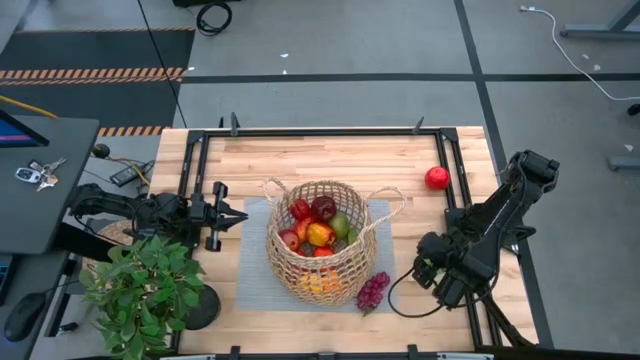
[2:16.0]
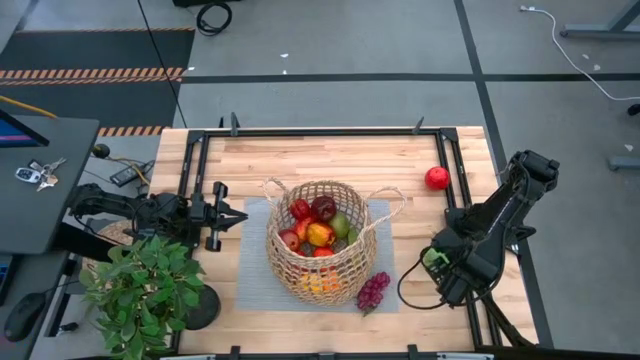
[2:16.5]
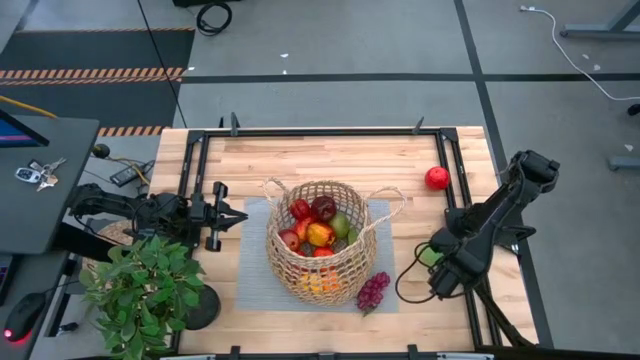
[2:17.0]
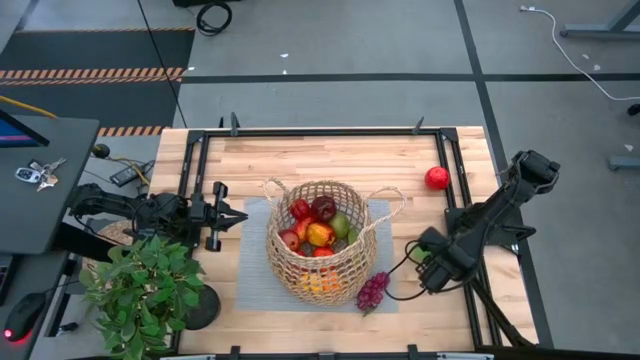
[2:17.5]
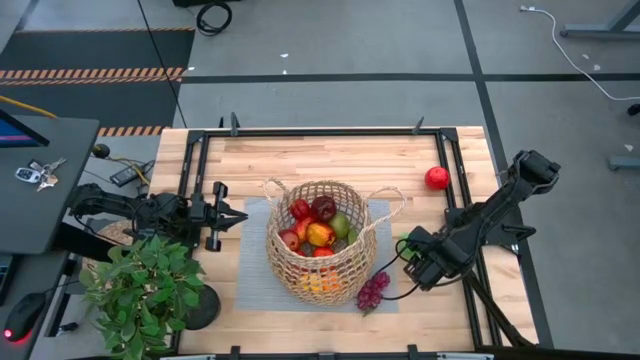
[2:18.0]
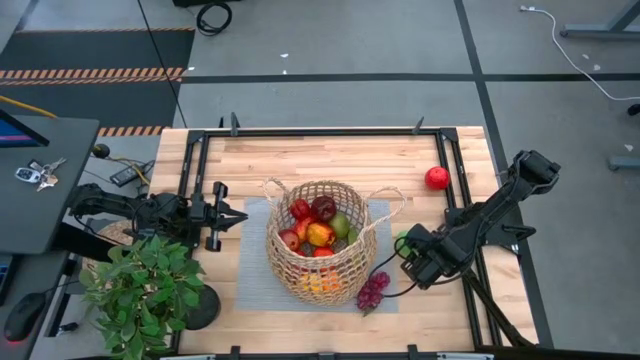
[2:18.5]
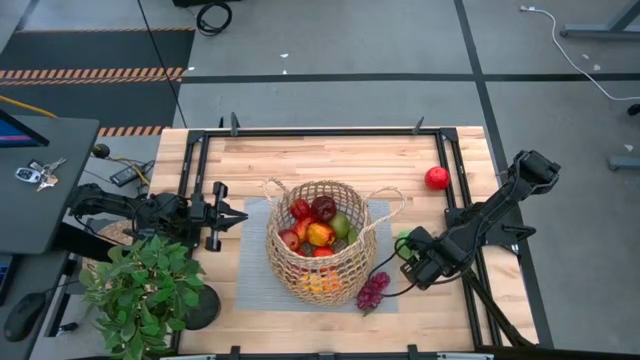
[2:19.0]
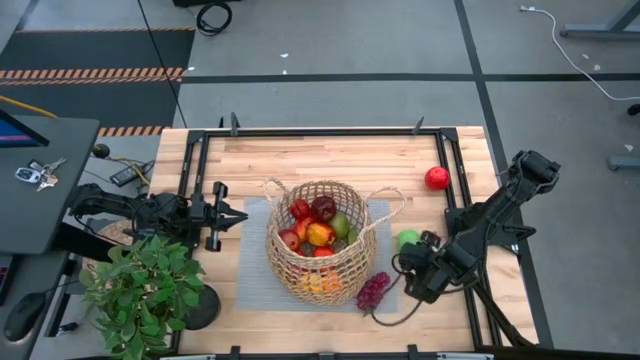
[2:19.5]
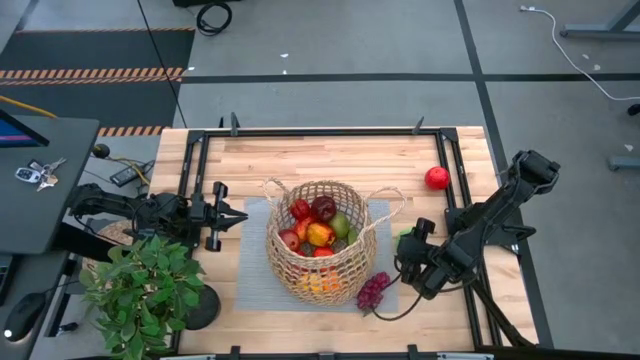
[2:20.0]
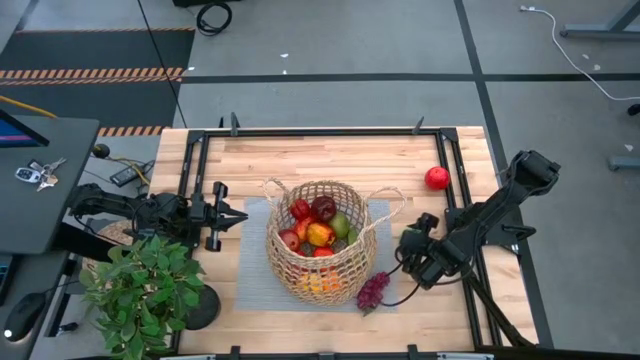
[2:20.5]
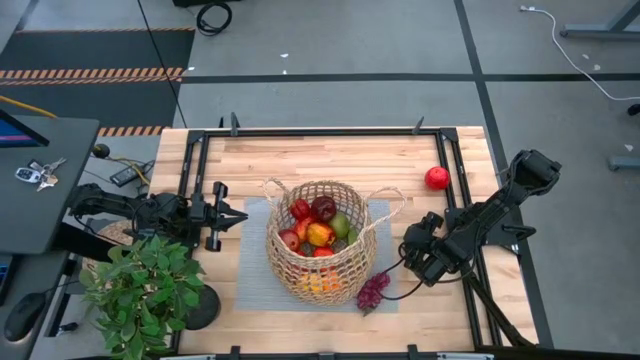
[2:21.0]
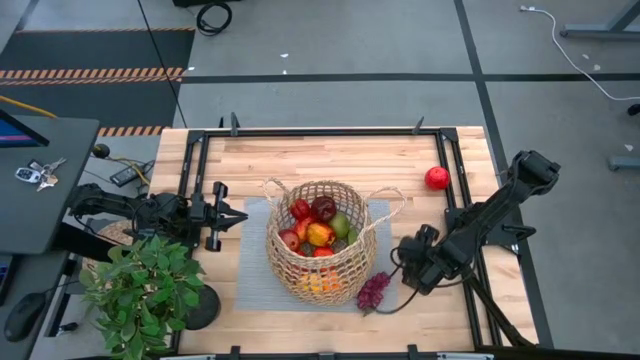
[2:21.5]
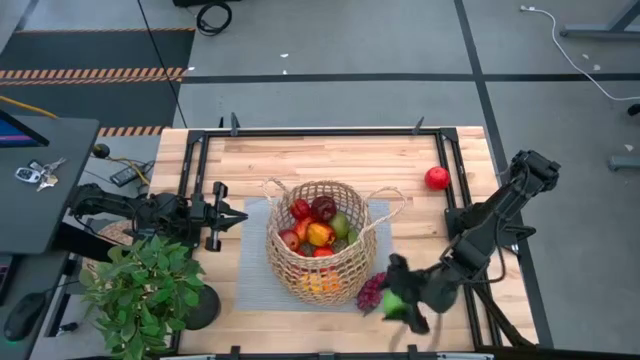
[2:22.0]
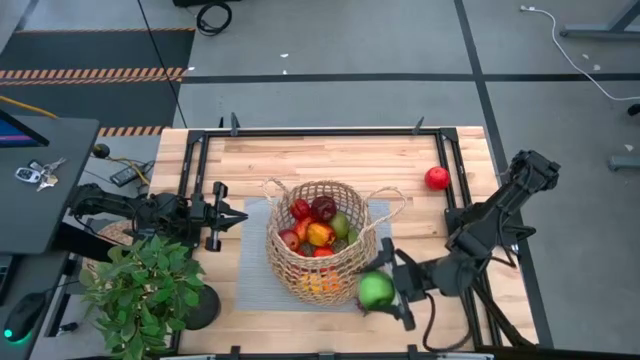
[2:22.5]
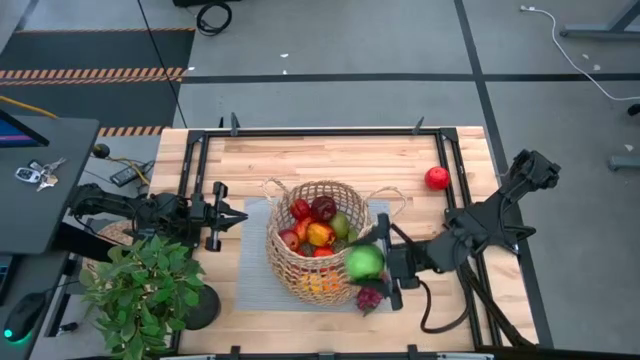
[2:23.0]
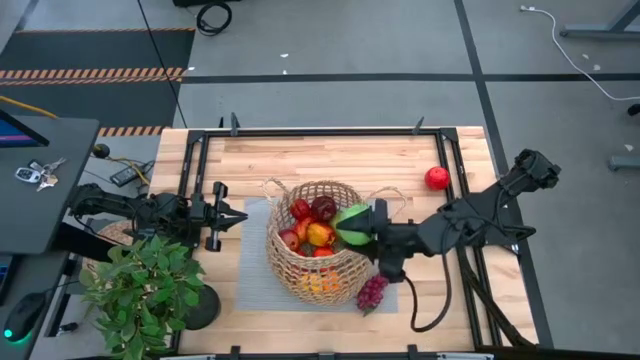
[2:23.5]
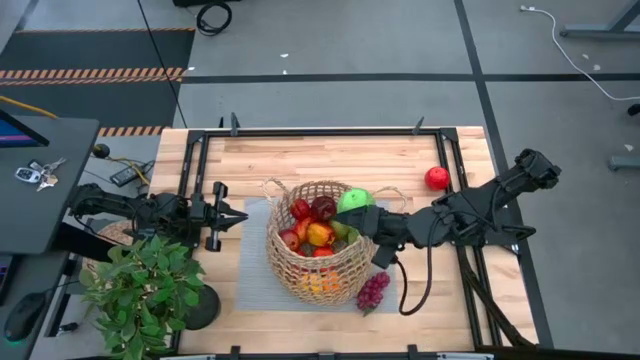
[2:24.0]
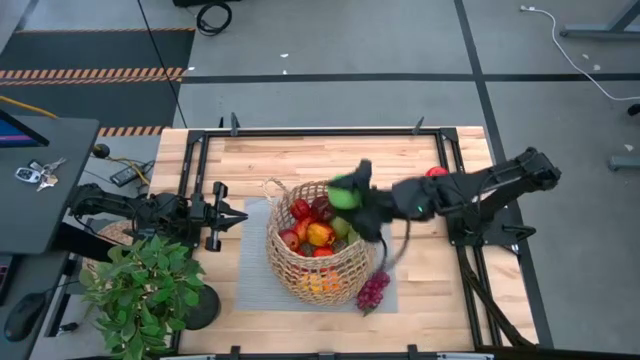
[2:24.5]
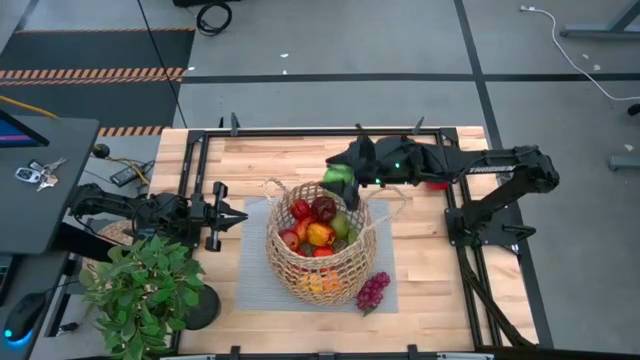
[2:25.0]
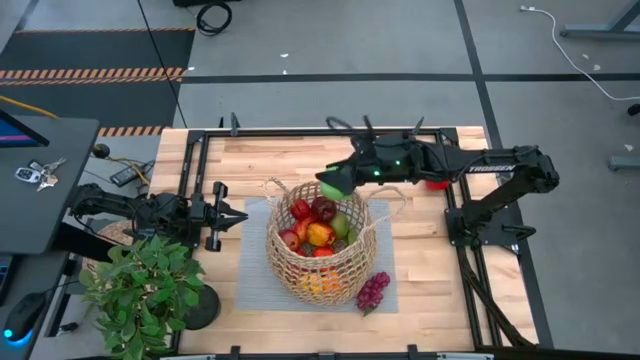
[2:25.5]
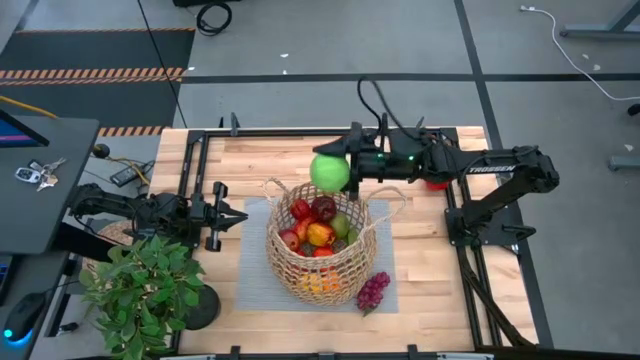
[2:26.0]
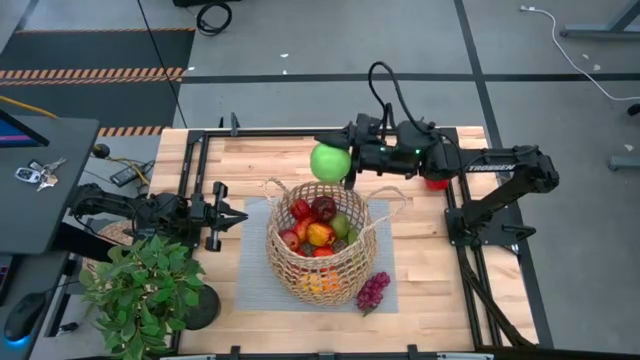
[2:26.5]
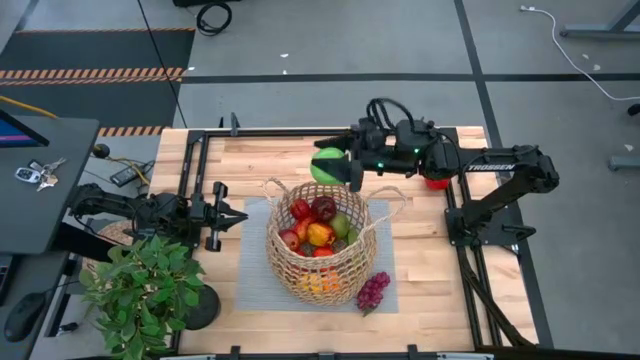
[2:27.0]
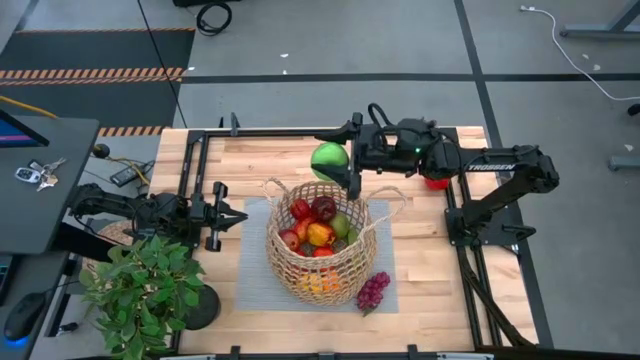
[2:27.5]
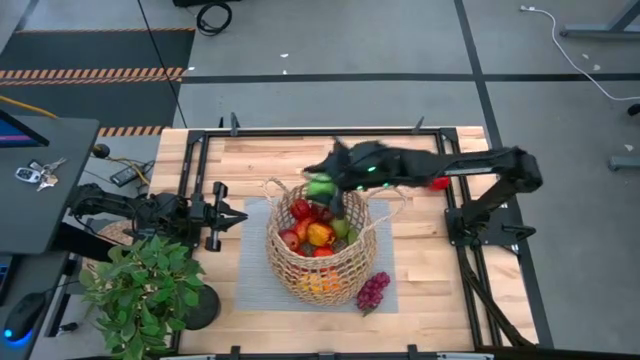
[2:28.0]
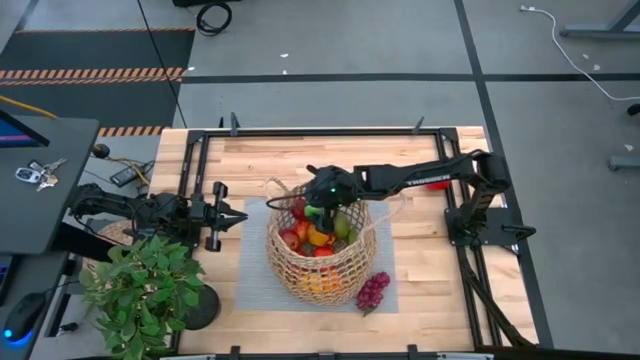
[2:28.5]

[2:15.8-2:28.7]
Task: Build produce basket
Put the green apple into the brown basket

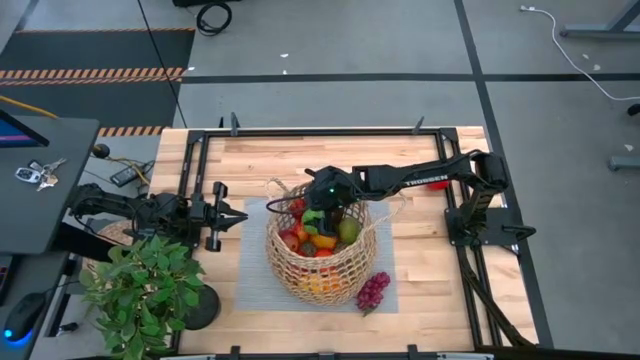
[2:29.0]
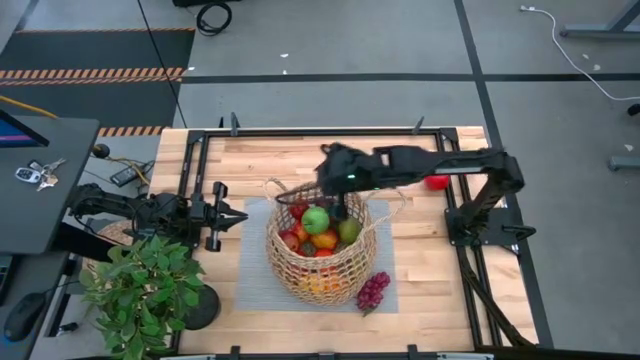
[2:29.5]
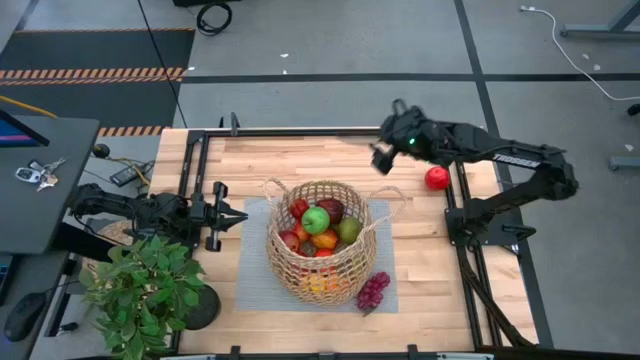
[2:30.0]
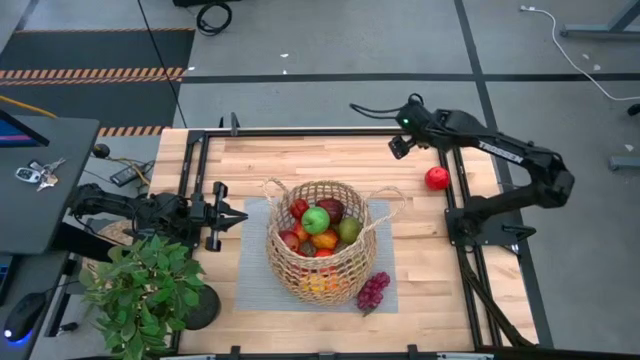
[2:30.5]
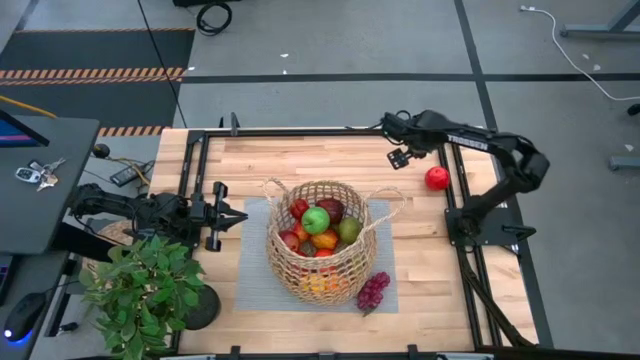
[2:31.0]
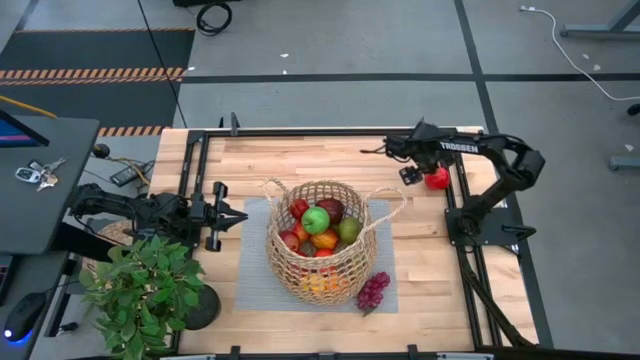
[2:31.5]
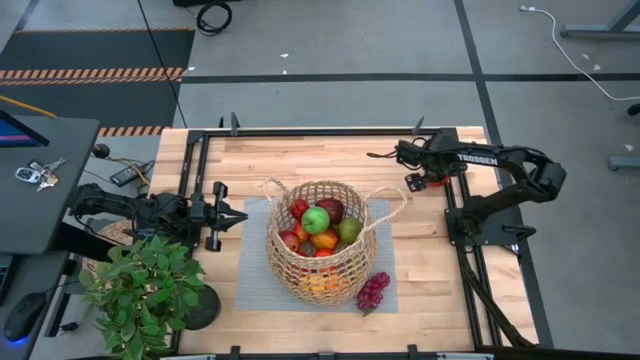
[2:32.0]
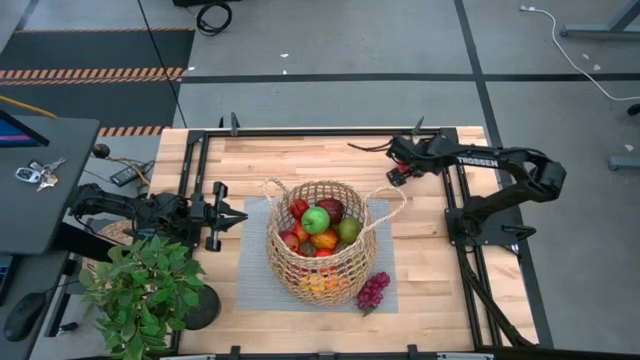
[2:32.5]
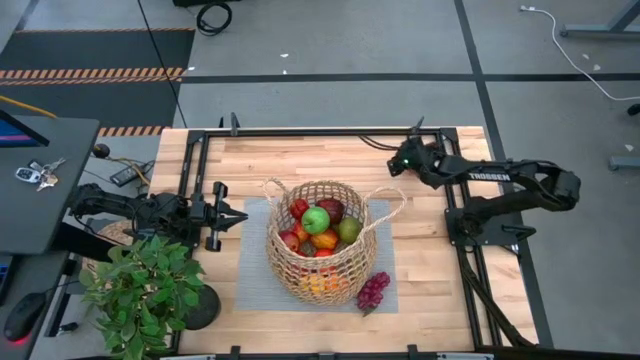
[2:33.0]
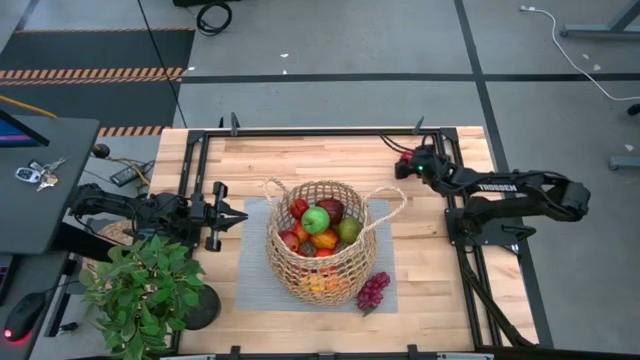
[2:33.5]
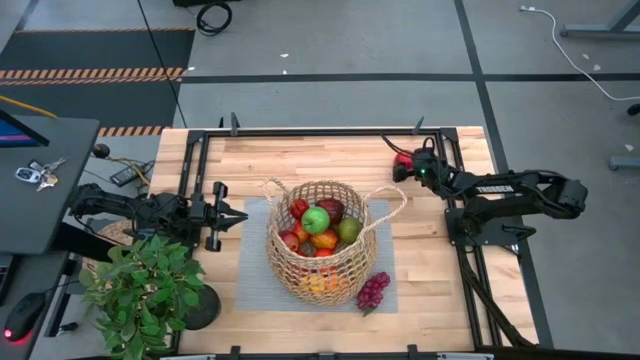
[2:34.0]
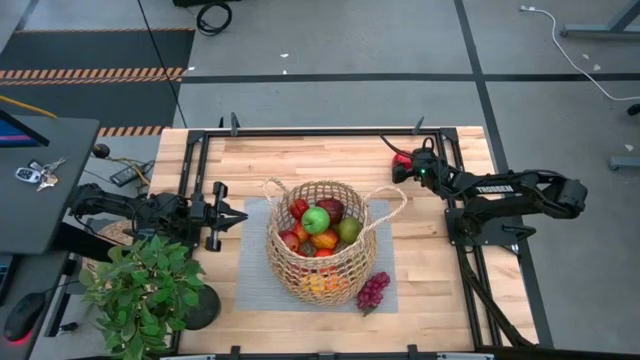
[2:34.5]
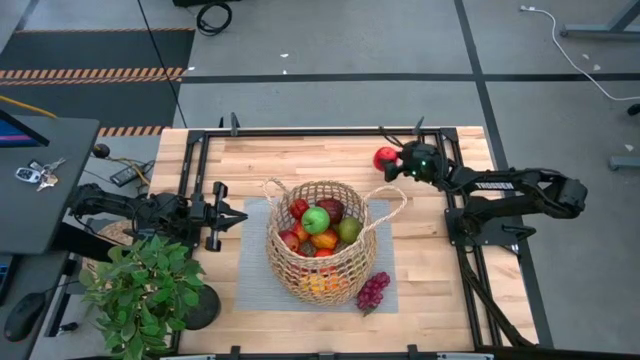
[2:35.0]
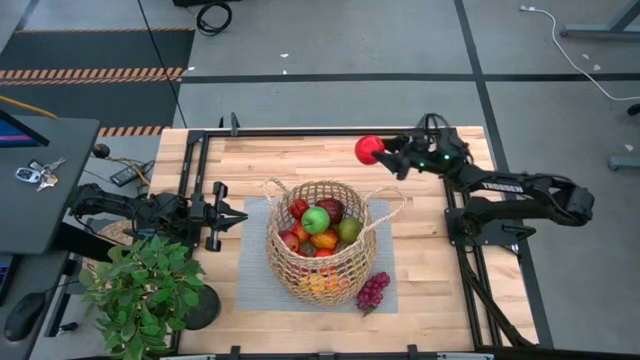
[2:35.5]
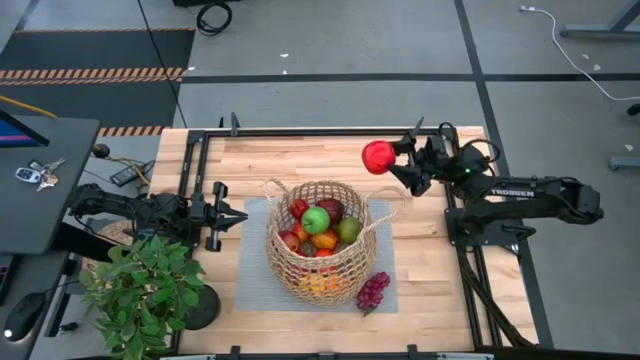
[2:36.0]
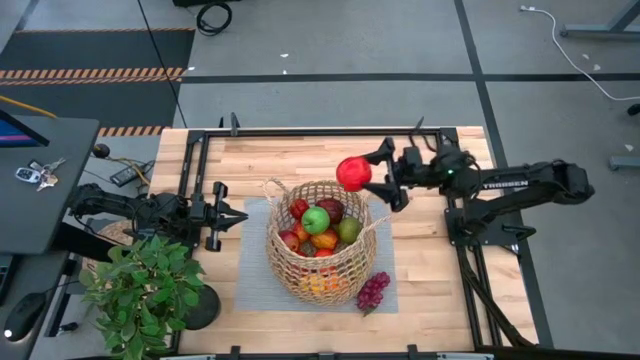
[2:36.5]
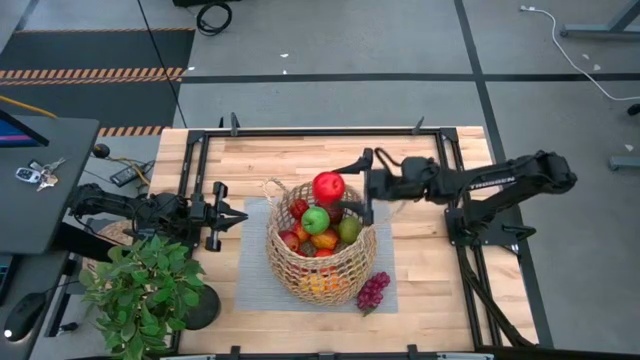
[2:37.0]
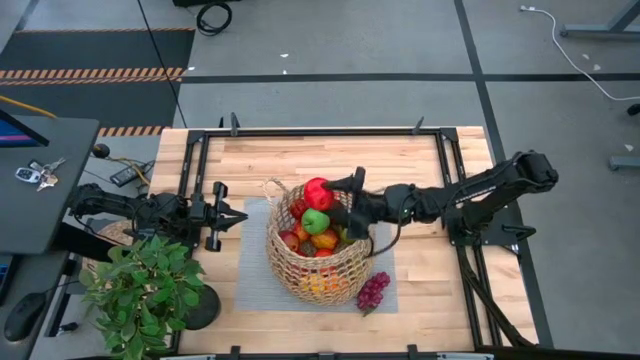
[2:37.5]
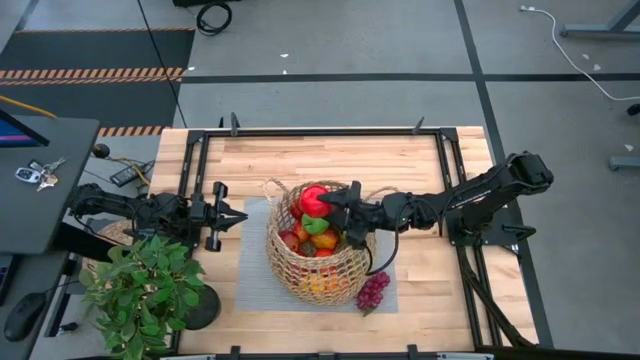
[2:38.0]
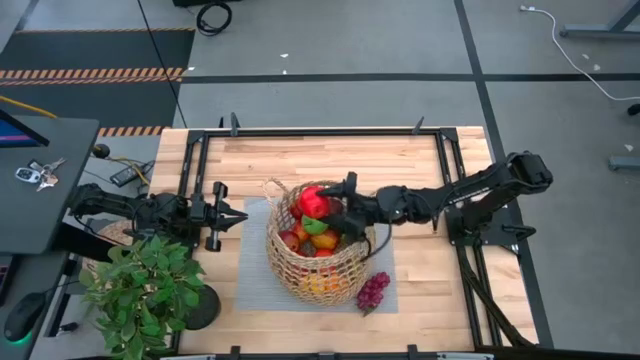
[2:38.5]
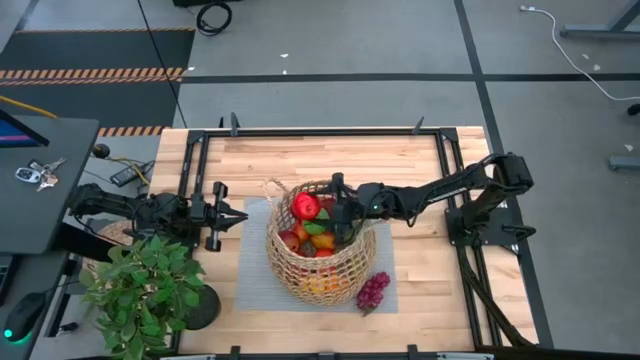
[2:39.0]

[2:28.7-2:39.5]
Put the red apple into the brown basket
